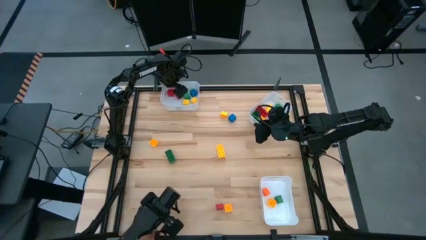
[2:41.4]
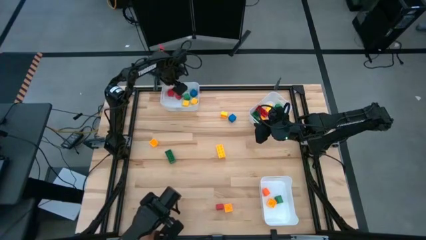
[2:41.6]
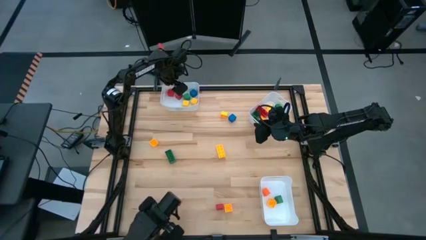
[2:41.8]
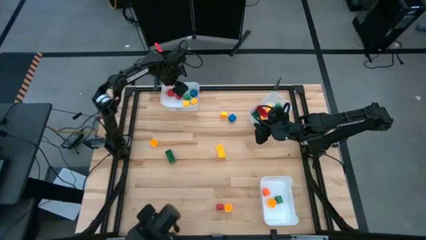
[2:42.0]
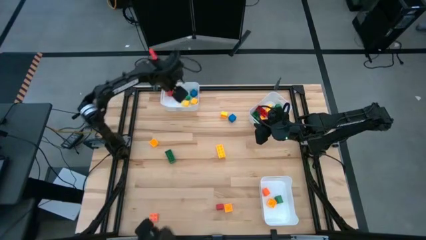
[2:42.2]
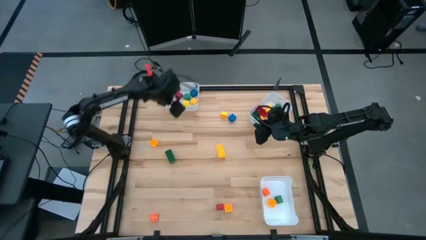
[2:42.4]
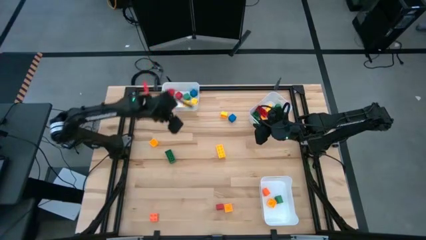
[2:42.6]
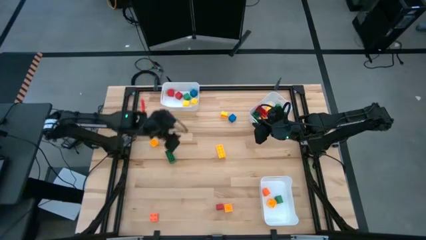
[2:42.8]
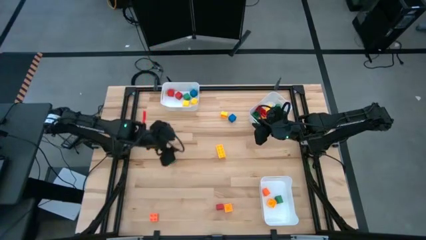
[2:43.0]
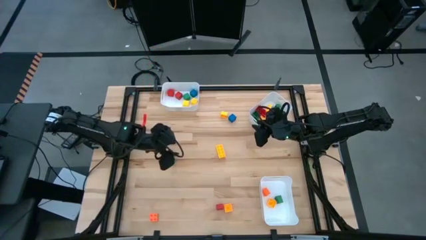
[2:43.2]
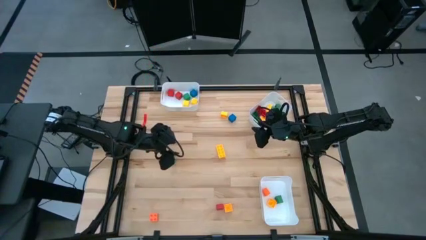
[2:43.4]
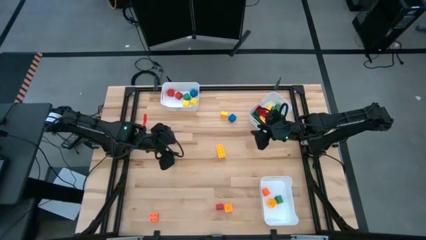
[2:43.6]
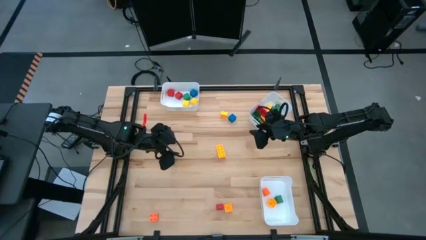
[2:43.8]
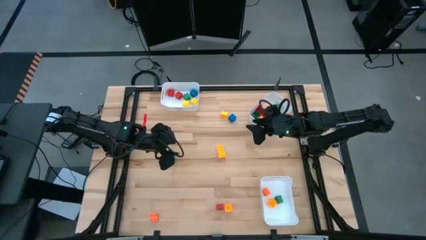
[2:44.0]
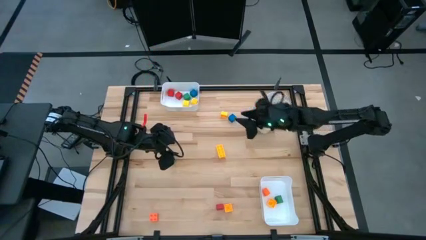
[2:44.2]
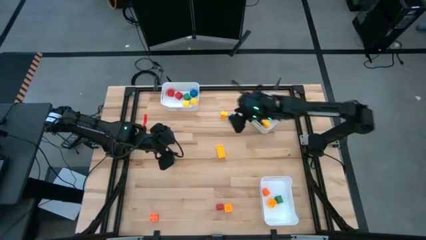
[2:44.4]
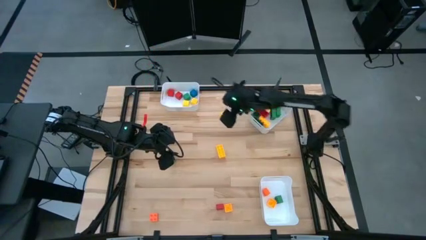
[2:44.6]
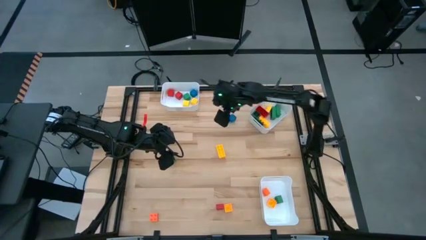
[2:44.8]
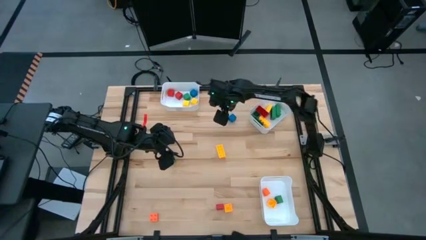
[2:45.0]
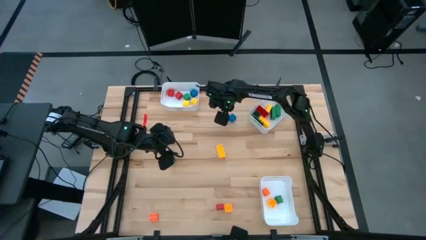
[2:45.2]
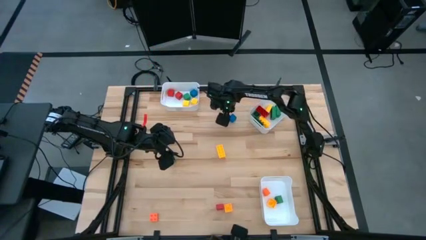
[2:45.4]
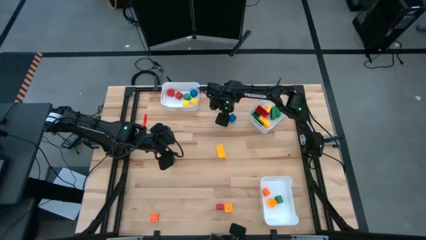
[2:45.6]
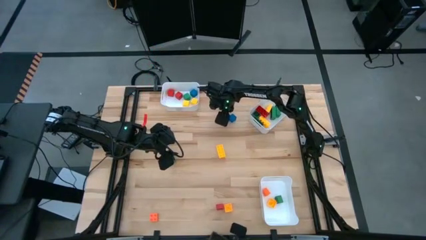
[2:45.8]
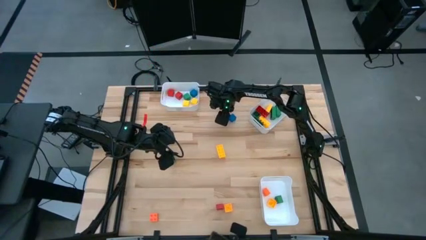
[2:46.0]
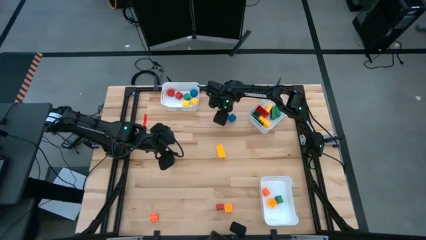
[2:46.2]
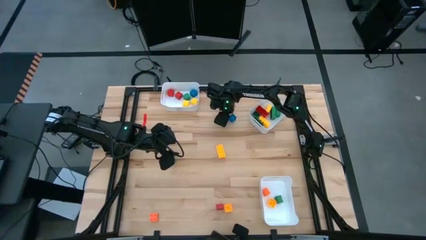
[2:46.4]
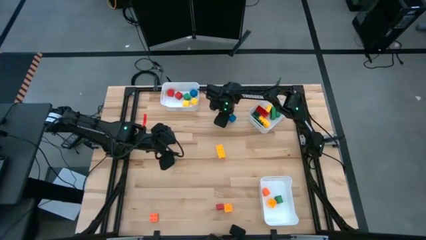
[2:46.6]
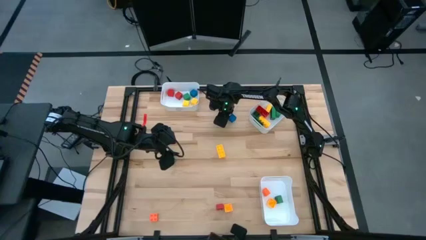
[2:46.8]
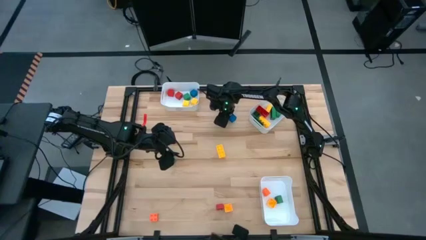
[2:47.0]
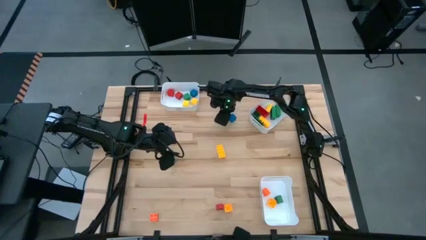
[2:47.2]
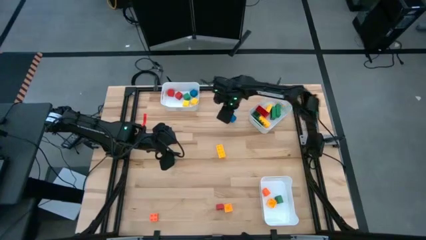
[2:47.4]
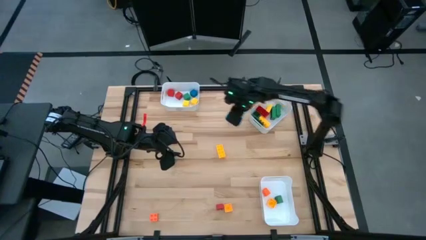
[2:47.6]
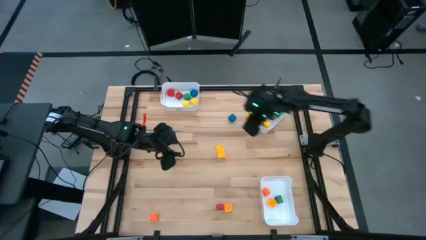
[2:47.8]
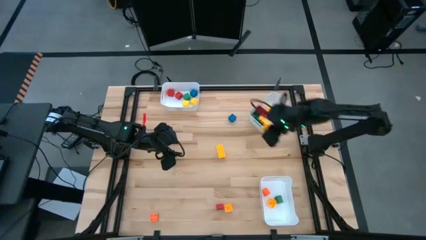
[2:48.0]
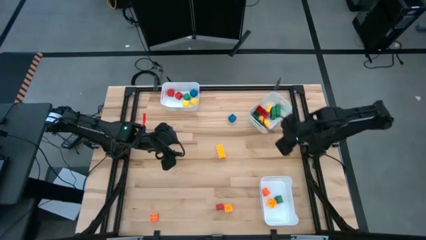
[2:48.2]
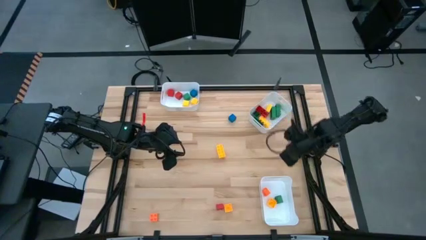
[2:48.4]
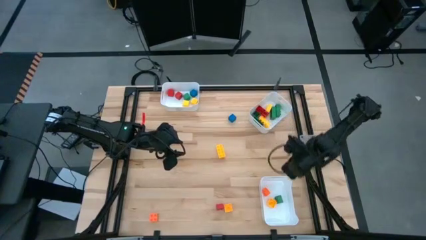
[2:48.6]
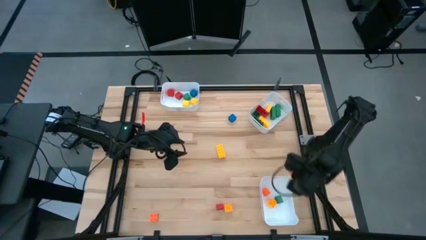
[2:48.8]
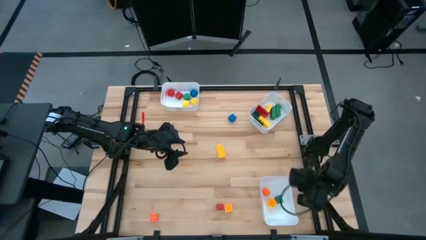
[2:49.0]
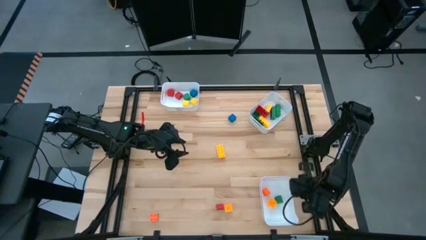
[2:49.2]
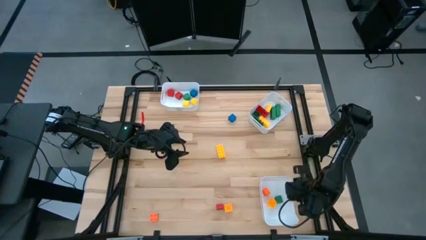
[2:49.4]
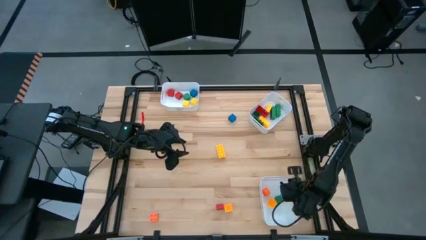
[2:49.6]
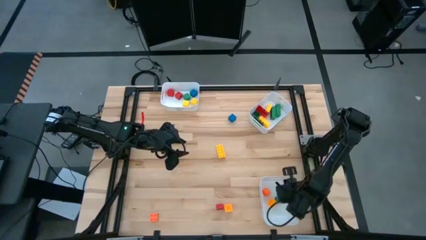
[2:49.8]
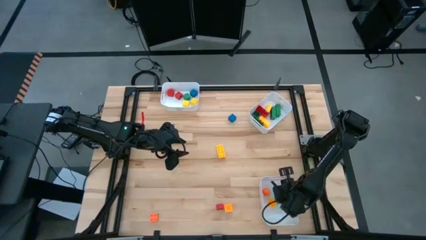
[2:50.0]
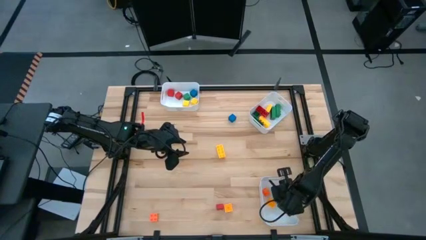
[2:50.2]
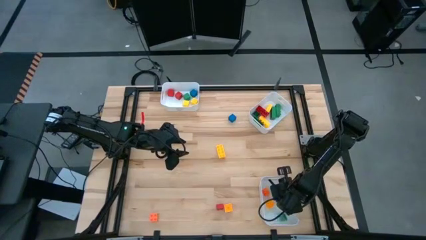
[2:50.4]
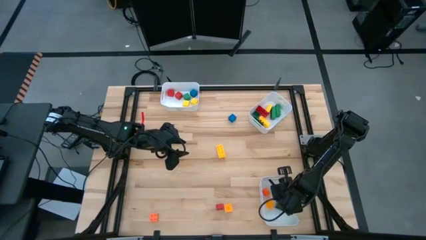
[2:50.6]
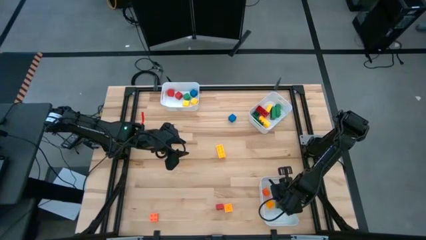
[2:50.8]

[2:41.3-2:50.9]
Task: Sort blocks by size
Put the yellow 4 stud gamepiece into the bottom white bin

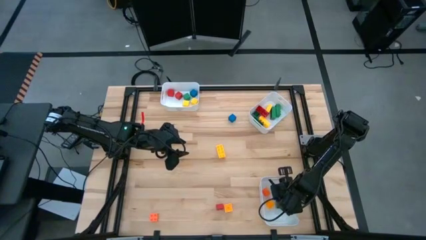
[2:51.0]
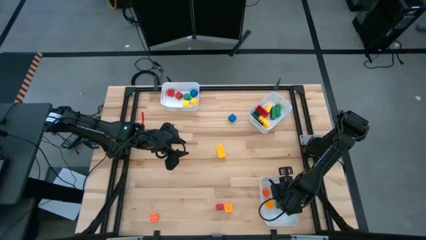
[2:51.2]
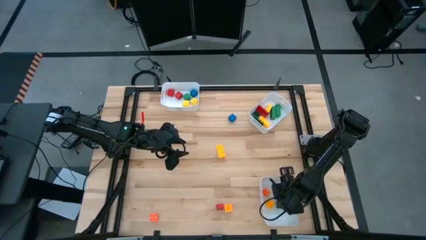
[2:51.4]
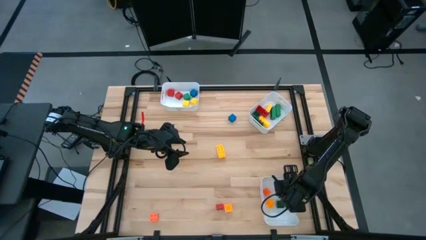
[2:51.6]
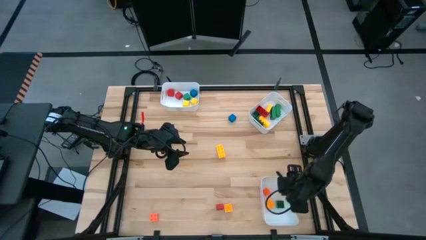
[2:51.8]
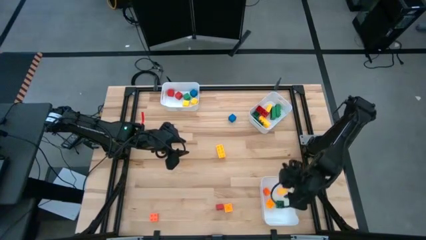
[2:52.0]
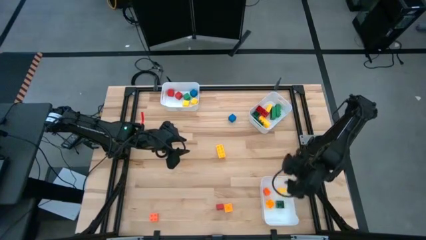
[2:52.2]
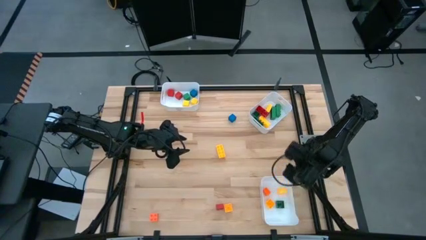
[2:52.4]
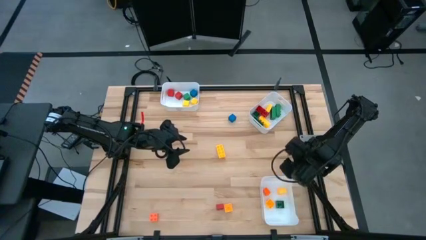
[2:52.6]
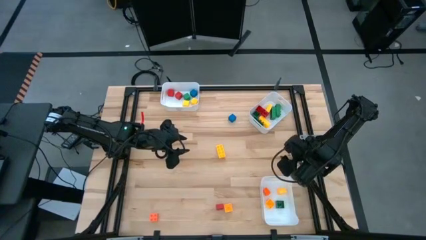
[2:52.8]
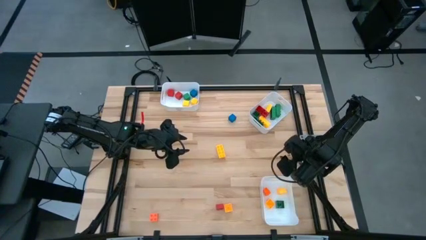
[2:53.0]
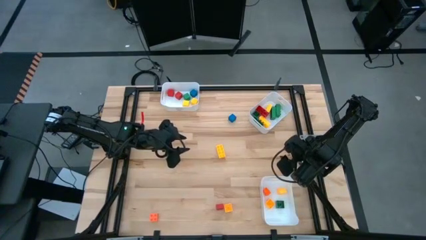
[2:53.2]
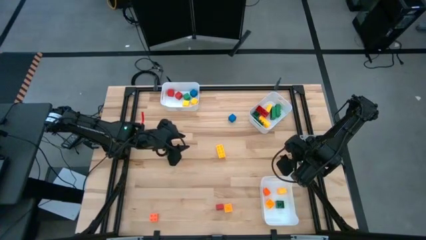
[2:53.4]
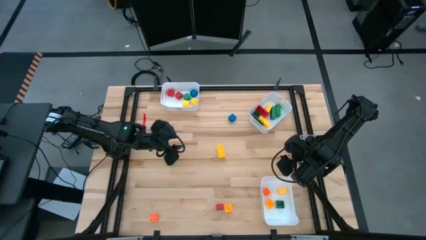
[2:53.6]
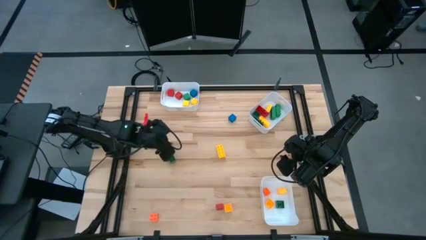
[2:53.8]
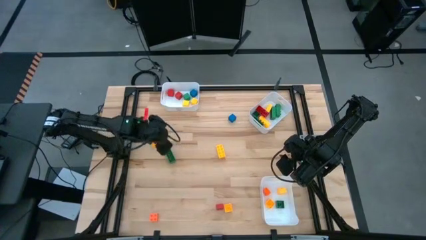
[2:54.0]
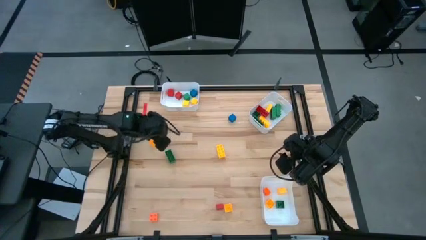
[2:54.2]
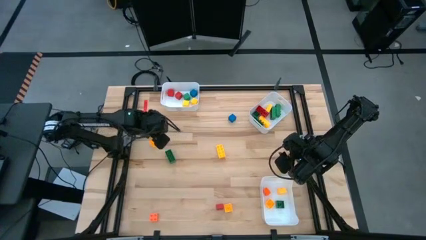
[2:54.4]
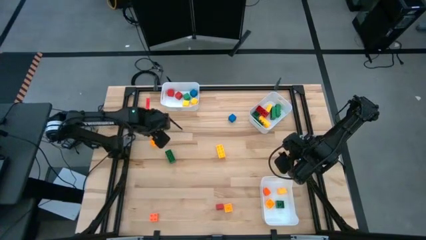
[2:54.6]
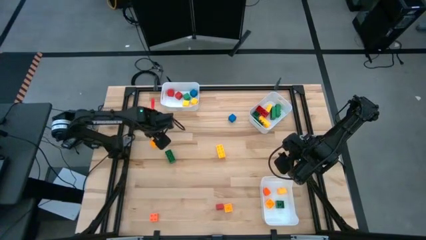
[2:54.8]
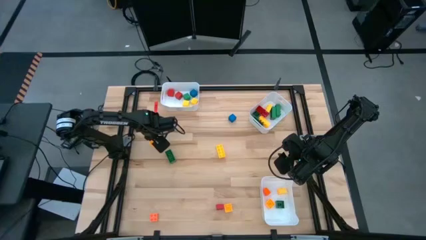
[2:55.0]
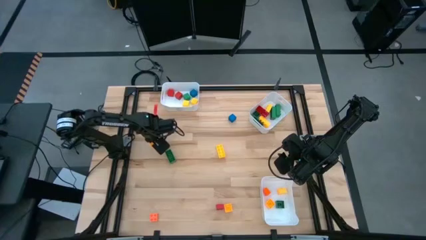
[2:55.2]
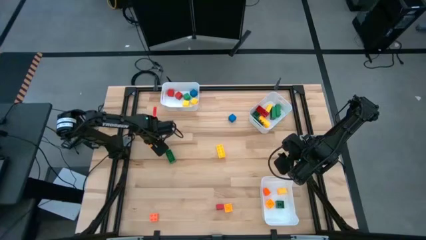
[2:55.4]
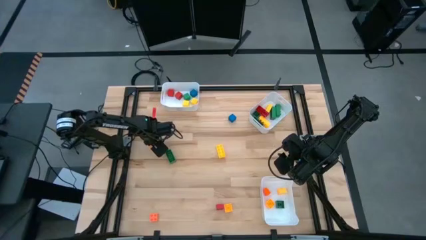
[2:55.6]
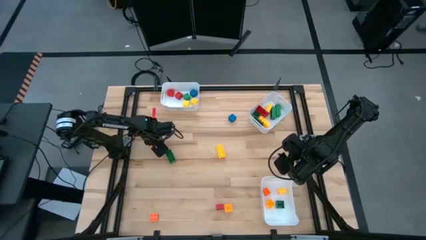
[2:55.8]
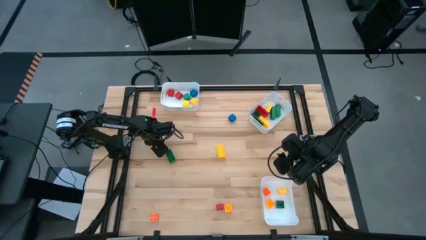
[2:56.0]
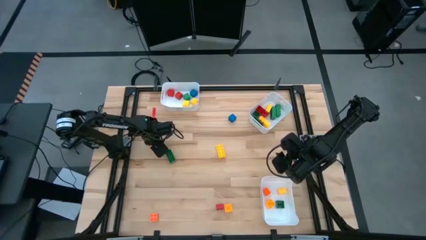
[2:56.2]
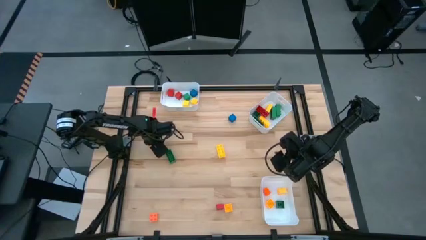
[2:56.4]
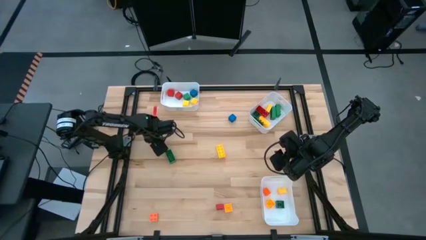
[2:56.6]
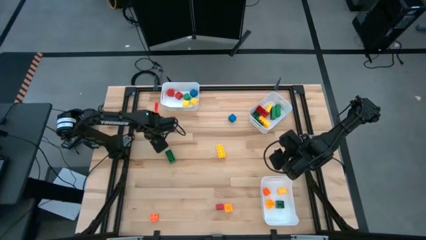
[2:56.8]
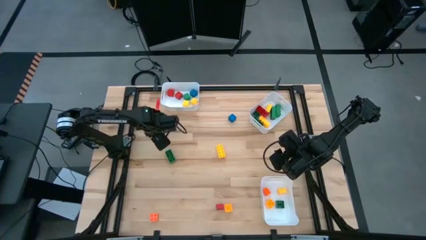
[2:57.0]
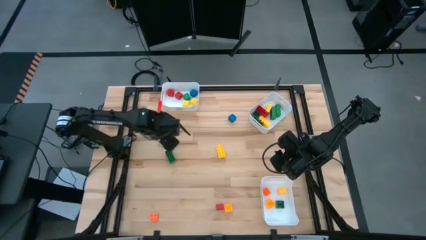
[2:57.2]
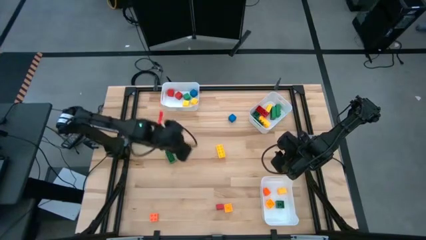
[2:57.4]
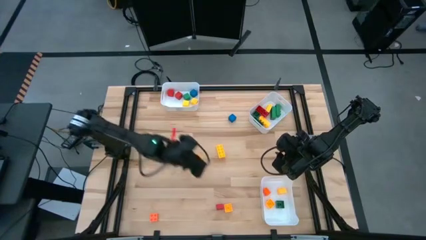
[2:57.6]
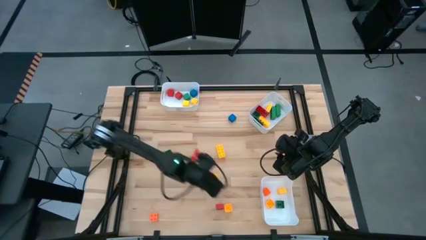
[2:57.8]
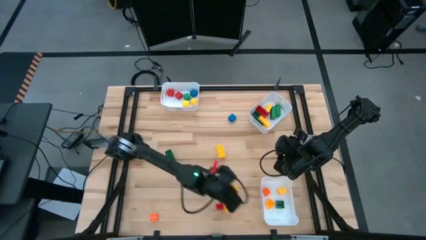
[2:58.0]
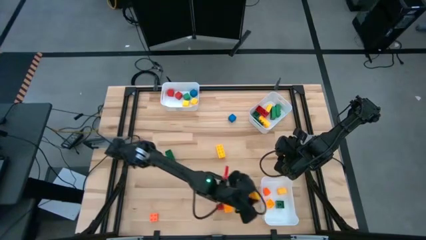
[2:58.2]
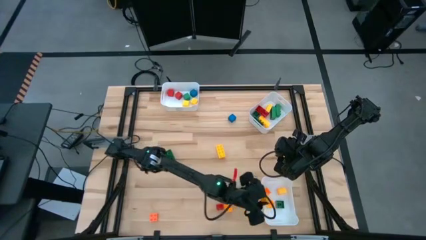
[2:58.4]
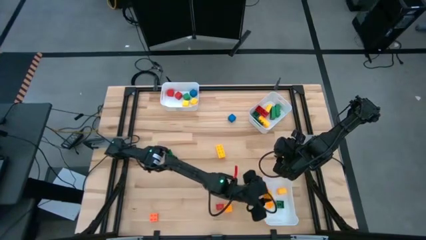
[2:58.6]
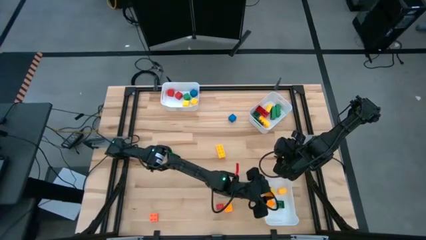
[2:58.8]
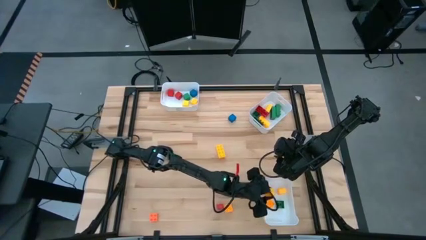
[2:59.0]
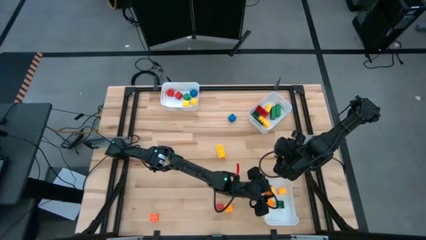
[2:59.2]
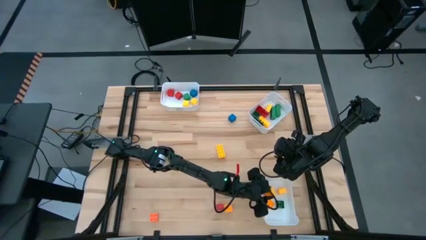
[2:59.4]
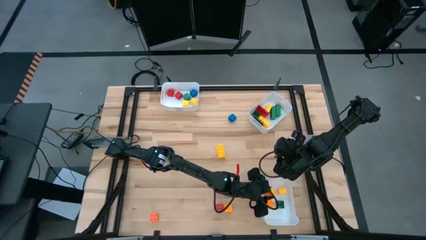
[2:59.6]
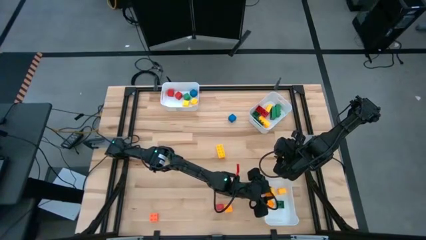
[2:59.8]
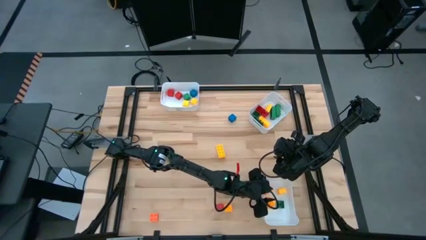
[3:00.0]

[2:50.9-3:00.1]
Put the yellow 4 stud gamepiece into the bottom white bin
